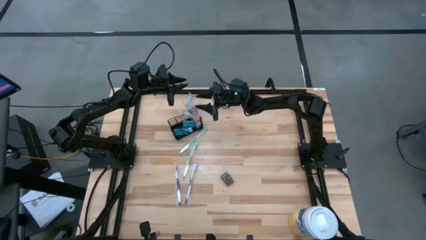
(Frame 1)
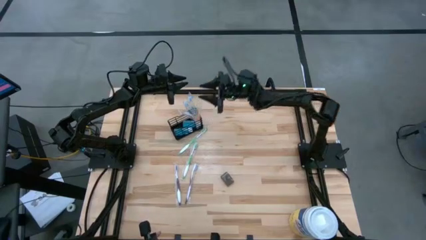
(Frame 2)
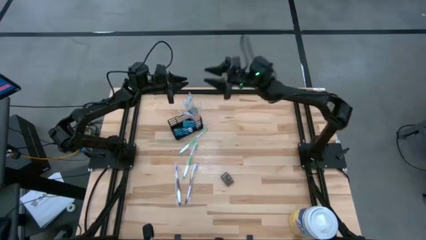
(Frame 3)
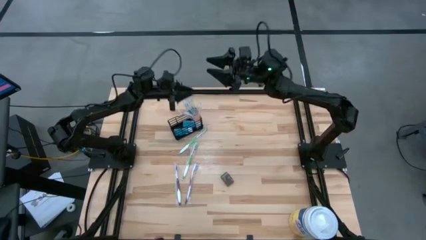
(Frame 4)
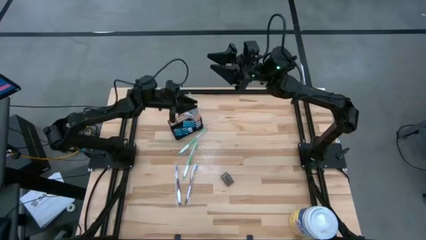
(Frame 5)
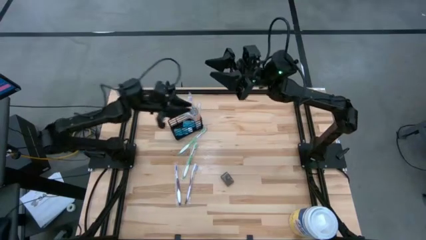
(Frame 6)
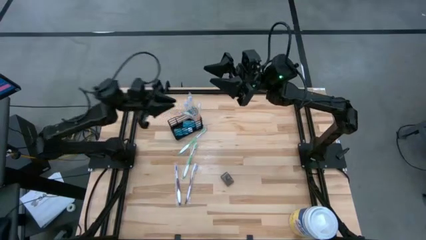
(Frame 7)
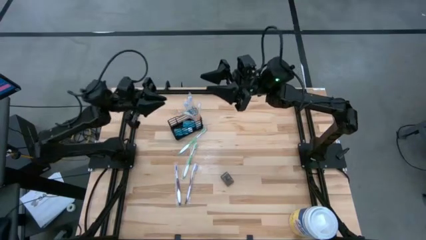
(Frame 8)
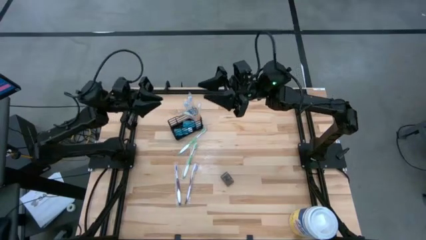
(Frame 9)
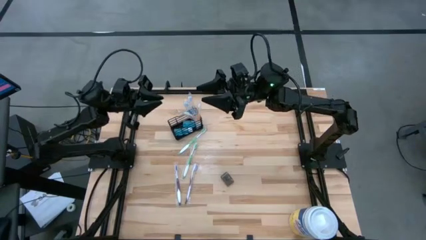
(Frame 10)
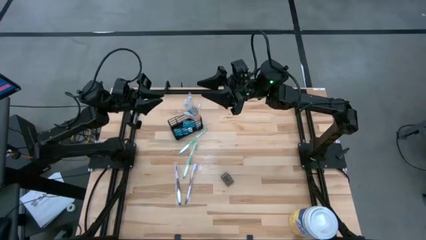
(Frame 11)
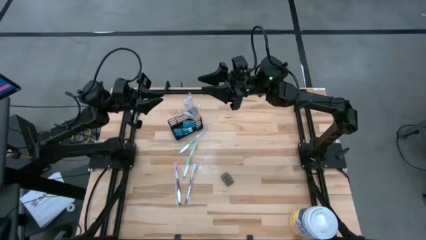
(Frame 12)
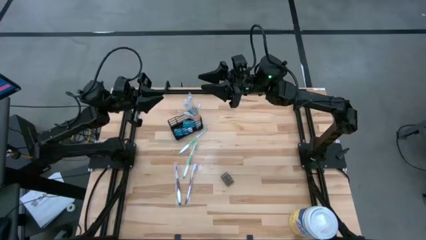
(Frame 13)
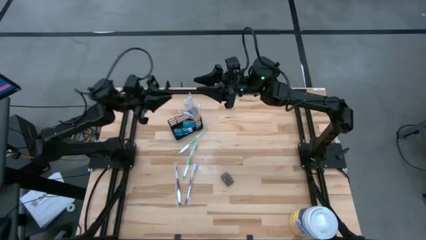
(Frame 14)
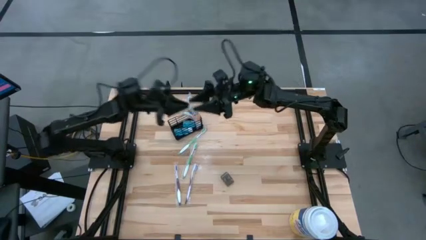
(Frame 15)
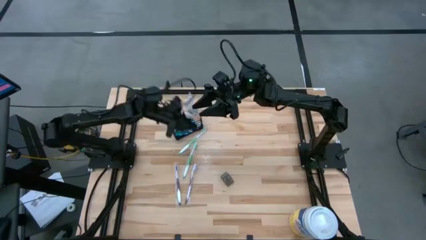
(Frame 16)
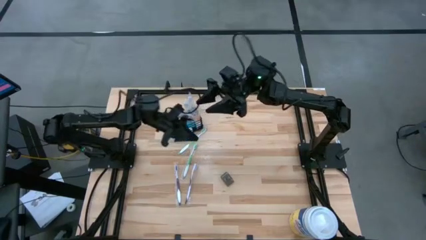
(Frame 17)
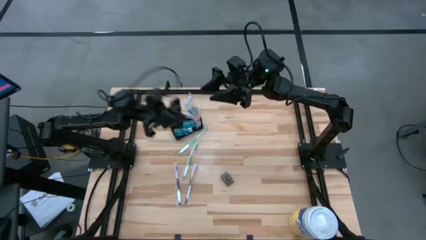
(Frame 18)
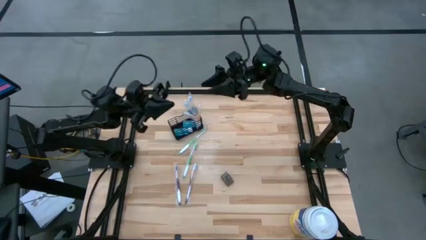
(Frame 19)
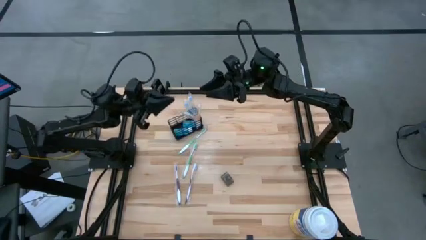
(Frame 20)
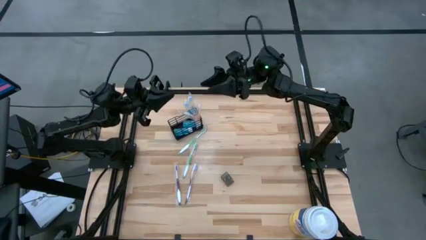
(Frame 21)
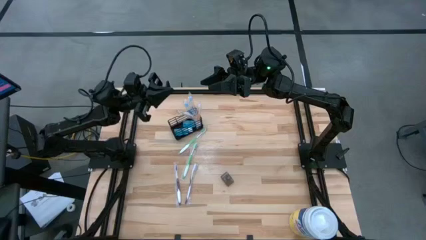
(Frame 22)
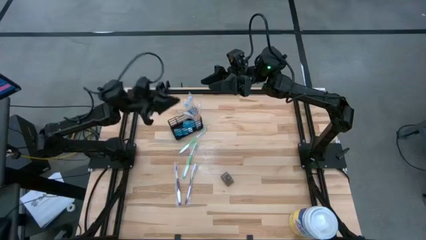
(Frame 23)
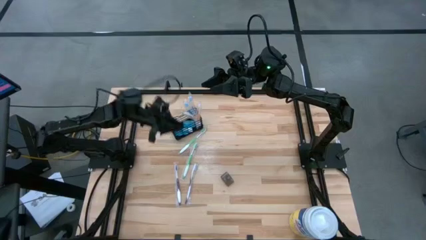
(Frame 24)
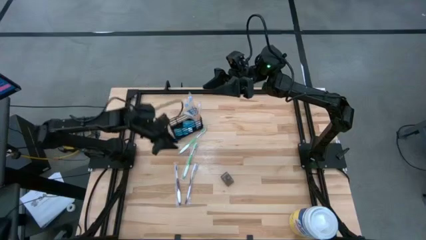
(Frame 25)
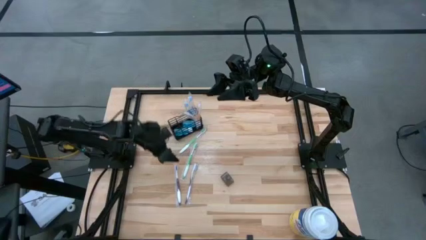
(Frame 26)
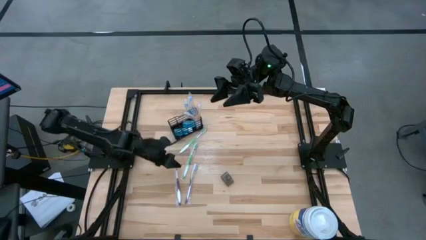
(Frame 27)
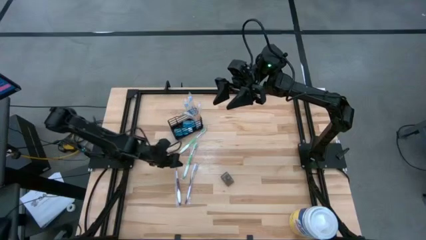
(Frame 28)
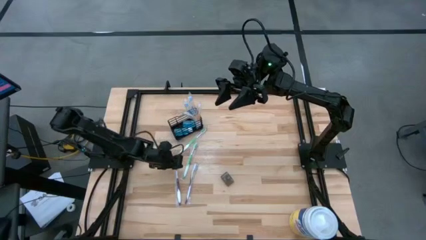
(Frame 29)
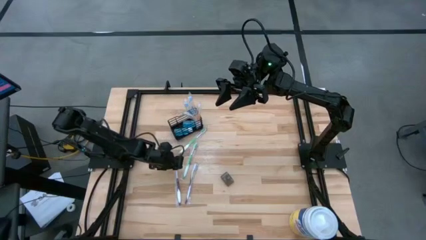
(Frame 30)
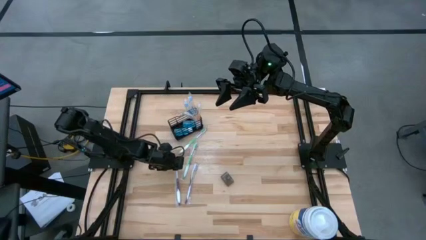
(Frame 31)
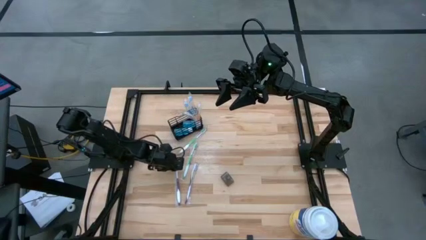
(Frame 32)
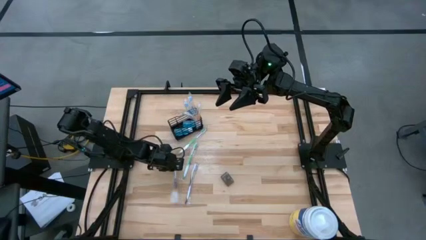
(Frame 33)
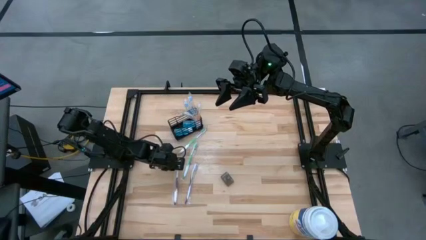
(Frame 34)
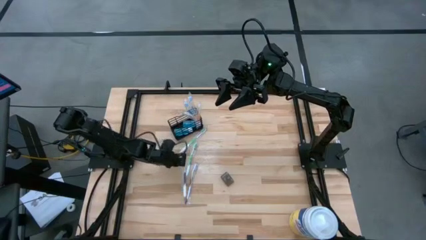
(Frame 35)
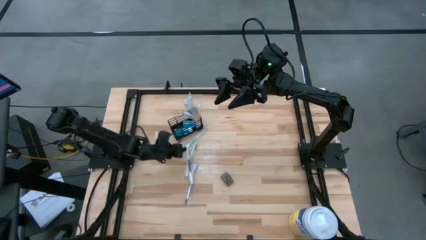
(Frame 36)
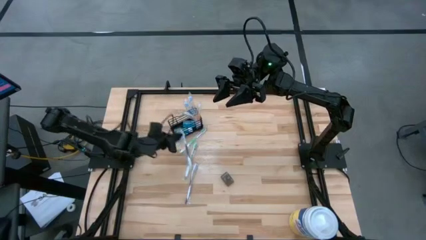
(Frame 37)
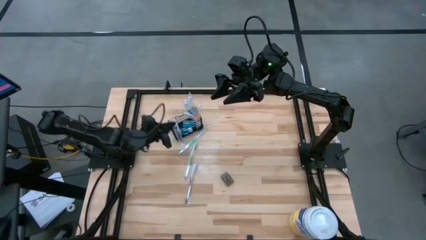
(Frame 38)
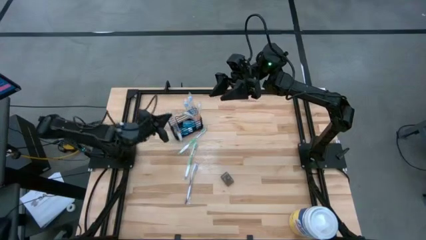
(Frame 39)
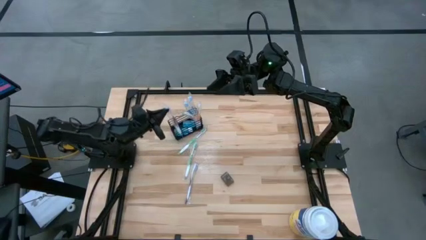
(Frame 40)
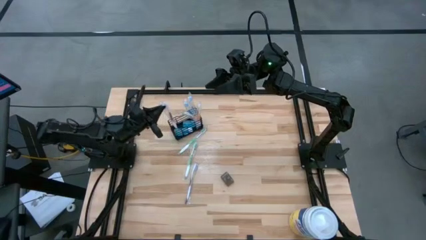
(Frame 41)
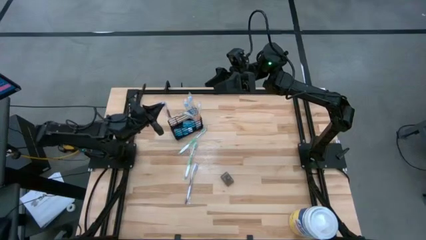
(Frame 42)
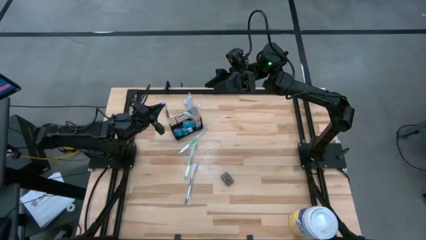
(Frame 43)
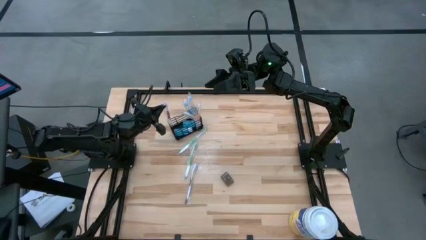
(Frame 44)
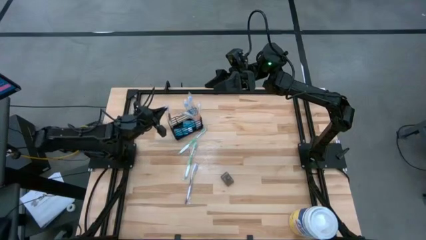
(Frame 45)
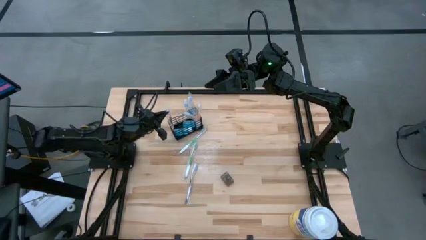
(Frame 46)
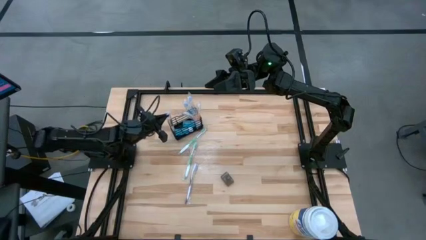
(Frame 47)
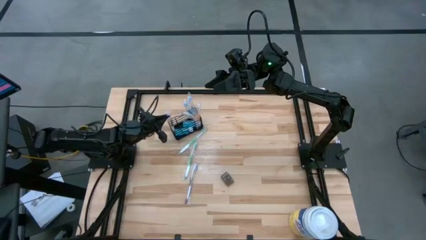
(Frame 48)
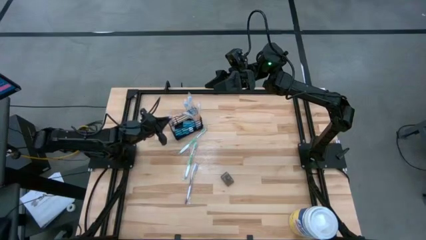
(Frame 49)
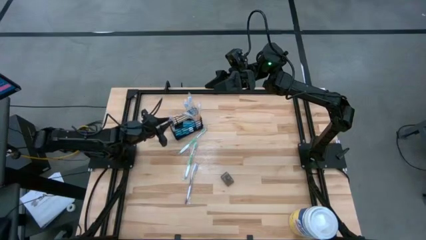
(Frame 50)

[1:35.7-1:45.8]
Task: Pick & Place toothbrushing station
Put the violet toothbrush into the black organizer

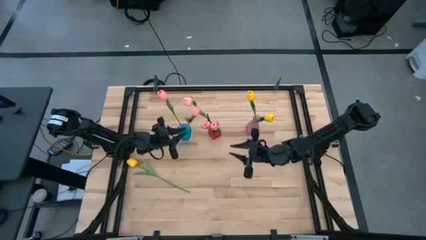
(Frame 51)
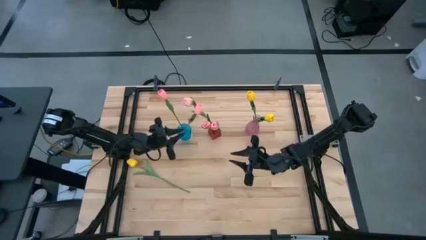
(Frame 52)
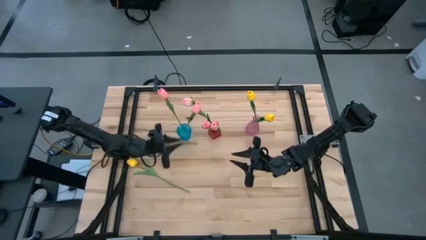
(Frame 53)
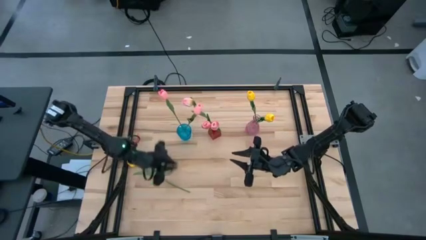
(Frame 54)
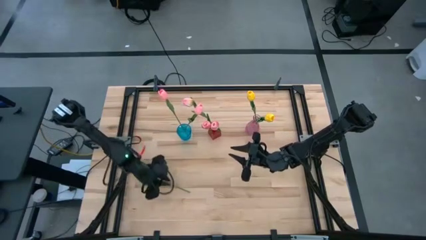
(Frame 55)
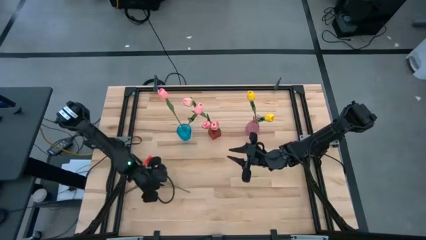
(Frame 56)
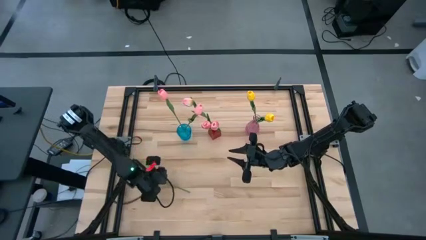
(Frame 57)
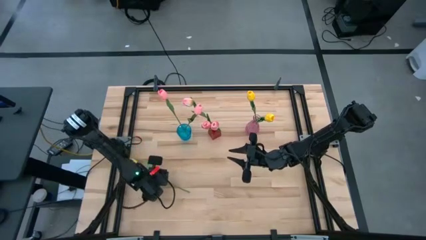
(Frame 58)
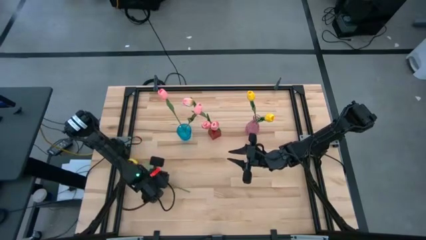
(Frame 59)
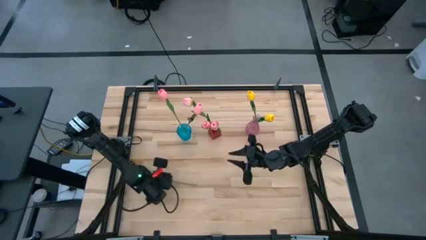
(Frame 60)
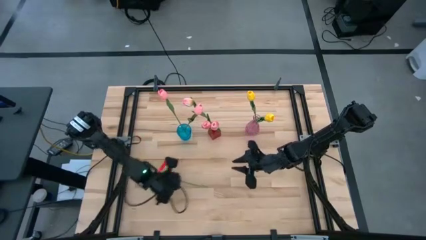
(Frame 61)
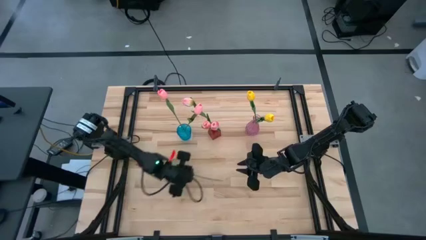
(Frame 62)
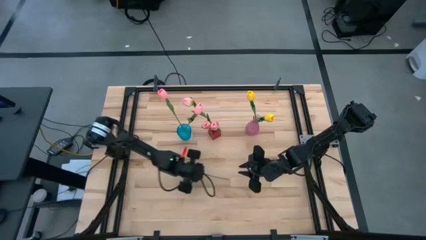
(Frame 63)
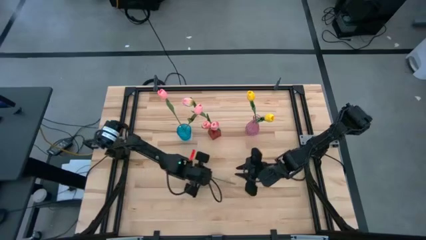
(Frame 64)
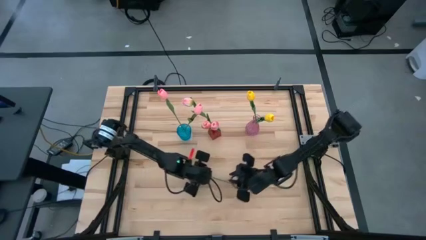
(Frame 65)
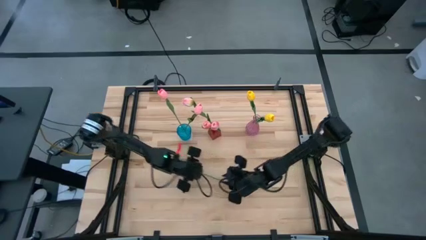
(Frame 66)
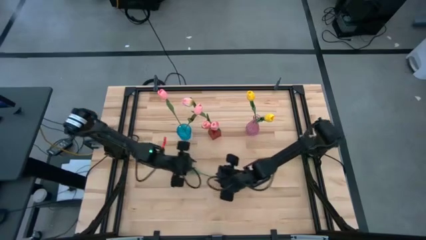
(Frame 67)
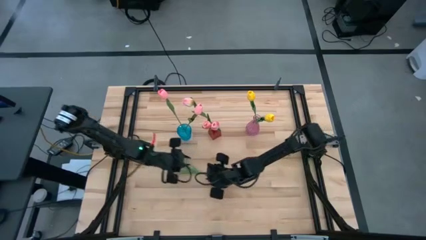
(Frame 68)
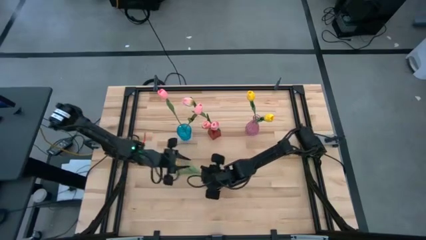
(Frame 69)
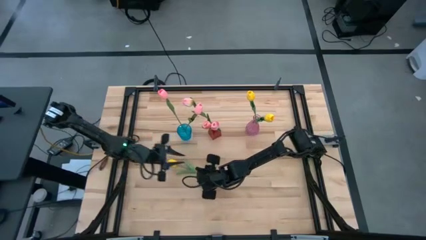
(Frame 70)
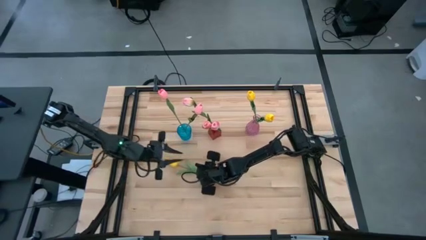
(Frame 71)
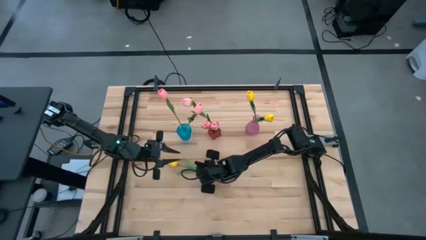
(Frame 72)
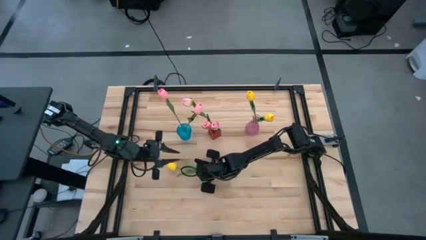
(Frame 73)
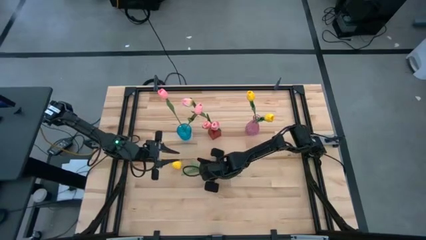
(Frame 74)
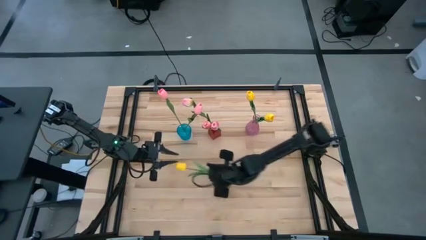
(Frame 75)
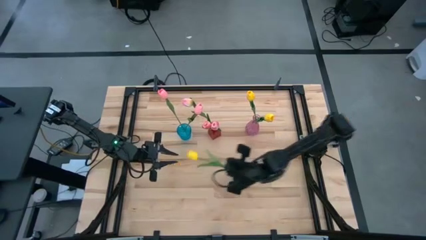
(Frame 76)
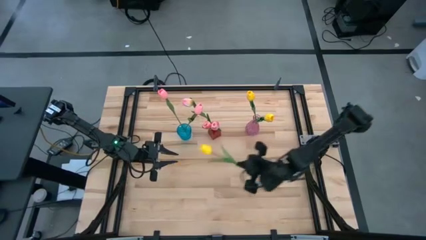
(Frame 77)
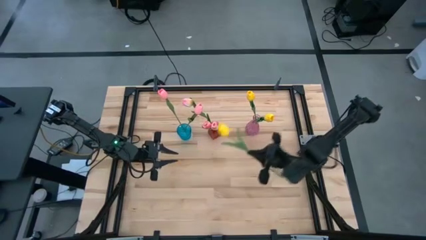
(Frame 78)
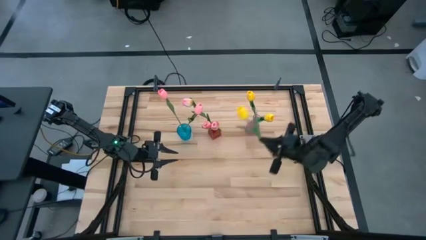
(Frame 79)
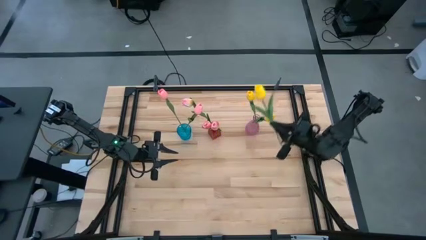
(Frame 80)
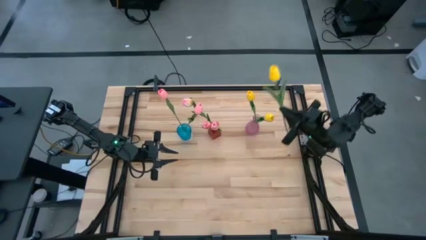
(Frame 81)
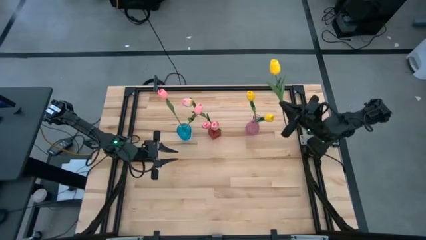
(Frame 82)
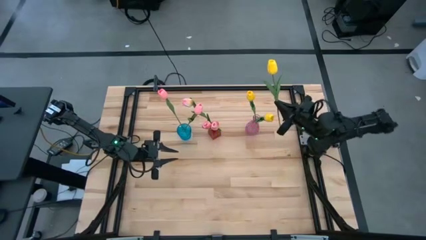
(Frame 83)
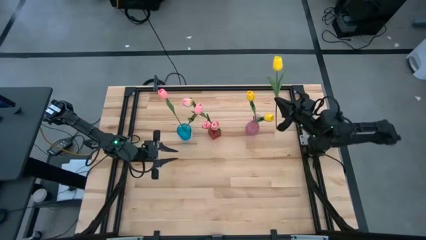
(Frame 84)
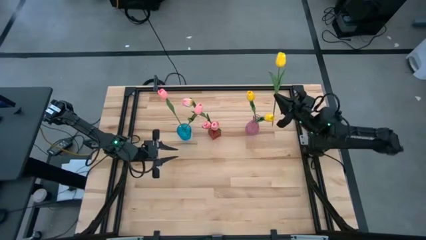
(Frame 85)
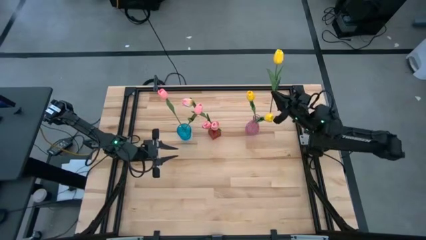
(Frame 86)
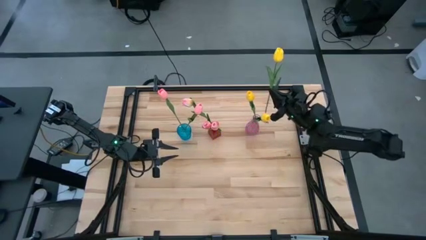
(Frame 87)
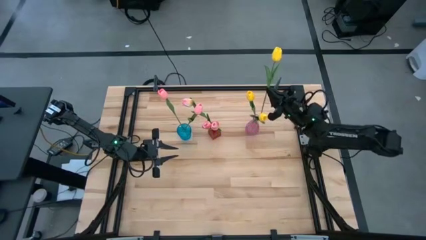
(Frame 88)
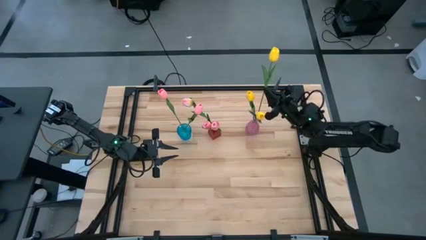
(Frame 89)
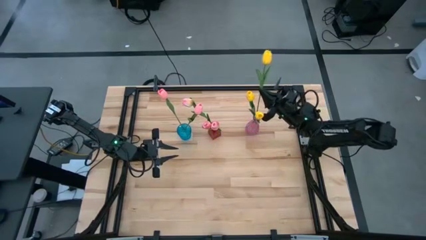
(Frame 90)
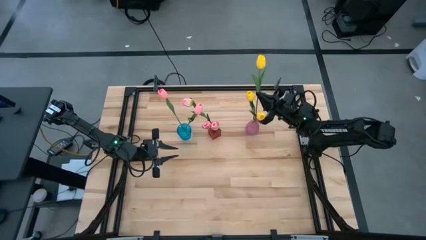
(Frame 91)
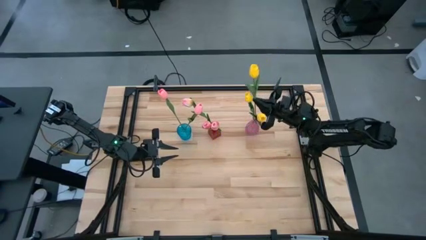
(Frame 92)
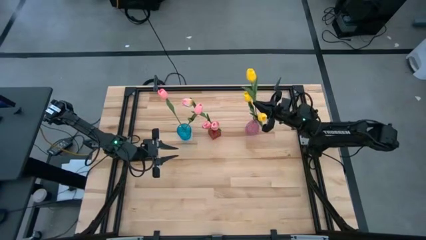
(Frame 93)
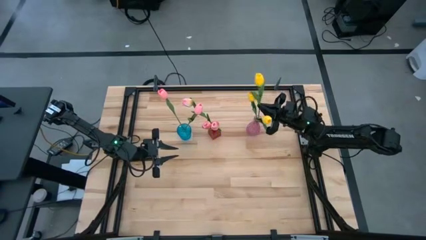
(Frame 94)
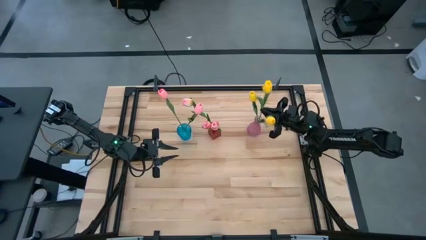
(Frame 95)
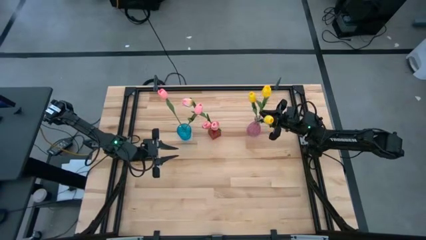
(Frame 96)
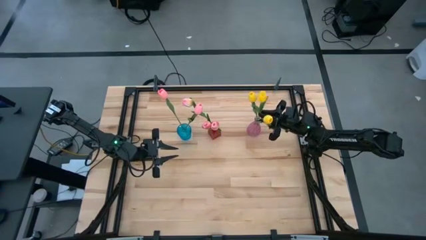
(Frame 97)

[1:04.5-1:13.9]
Task: Sort flowers into vase by color
Put the yellow flower into the pink vase
